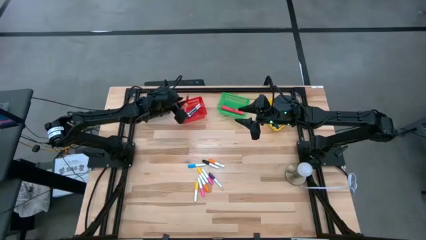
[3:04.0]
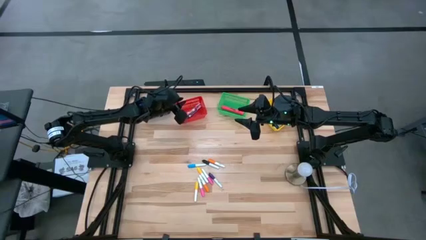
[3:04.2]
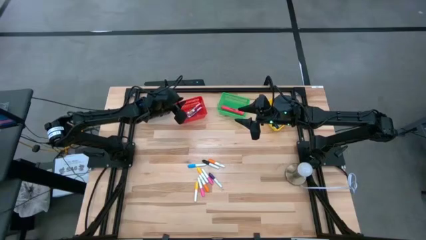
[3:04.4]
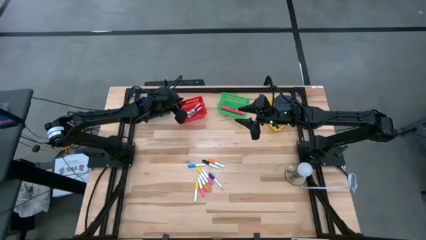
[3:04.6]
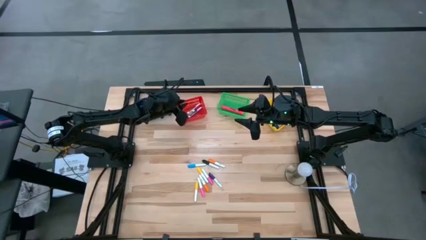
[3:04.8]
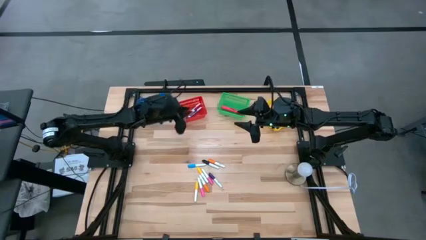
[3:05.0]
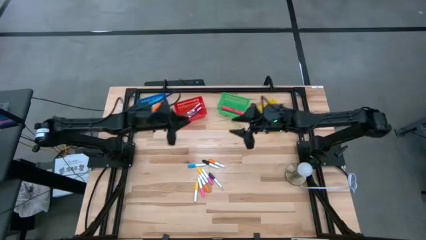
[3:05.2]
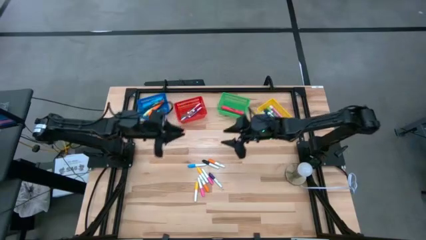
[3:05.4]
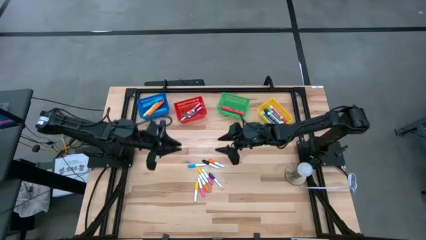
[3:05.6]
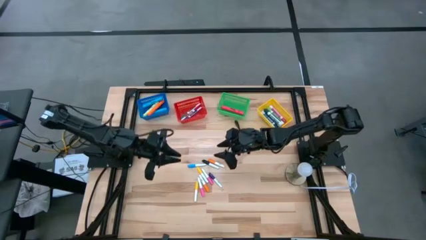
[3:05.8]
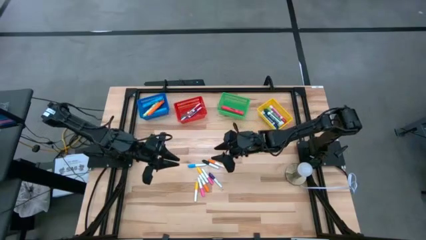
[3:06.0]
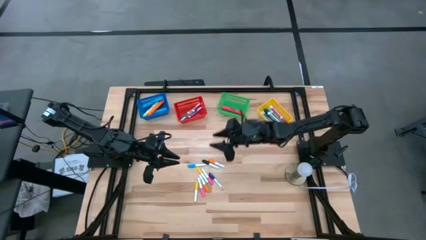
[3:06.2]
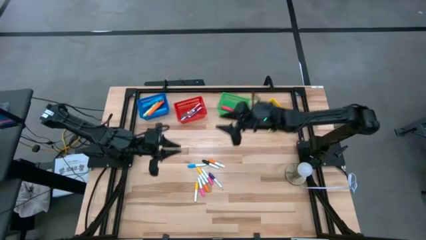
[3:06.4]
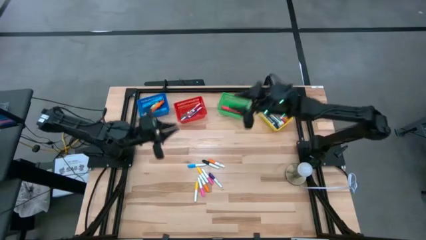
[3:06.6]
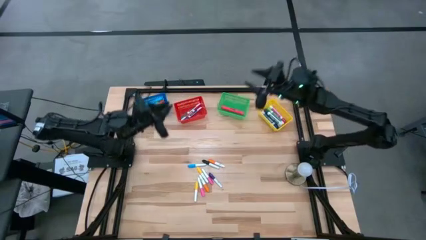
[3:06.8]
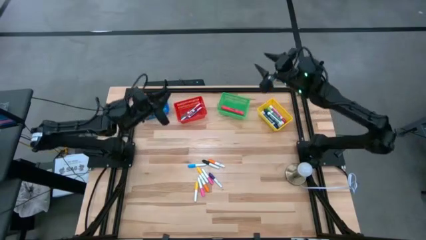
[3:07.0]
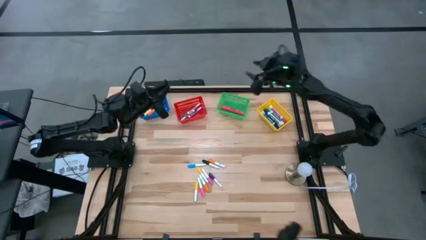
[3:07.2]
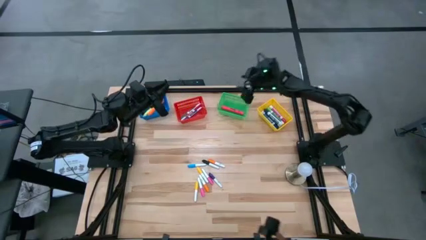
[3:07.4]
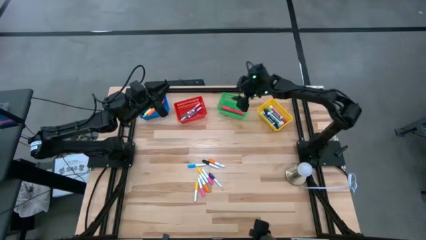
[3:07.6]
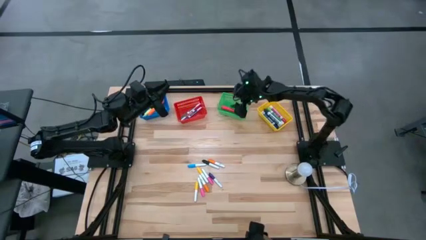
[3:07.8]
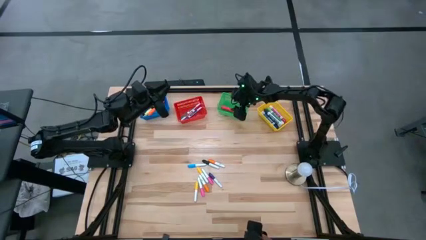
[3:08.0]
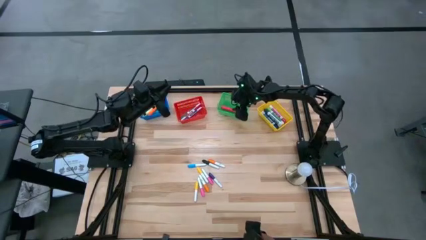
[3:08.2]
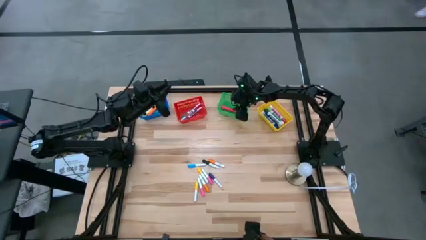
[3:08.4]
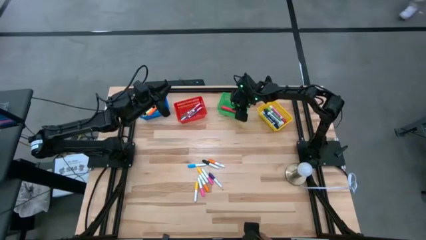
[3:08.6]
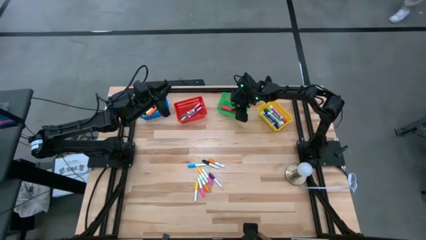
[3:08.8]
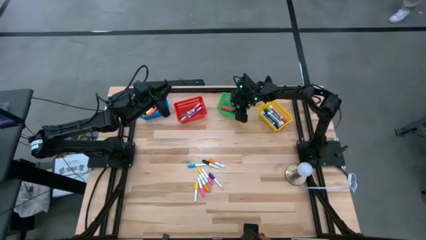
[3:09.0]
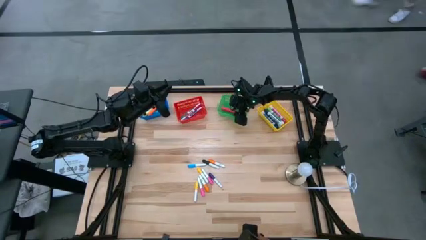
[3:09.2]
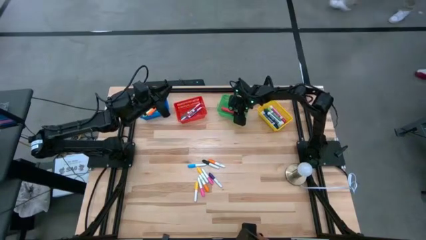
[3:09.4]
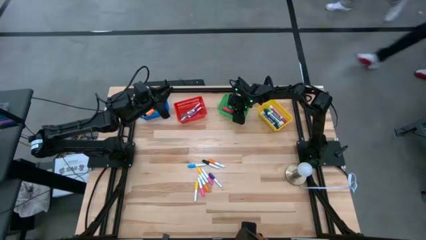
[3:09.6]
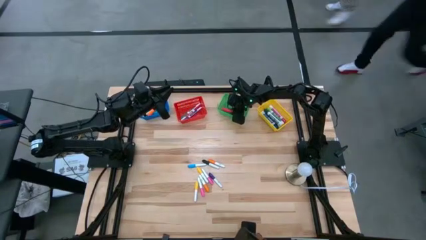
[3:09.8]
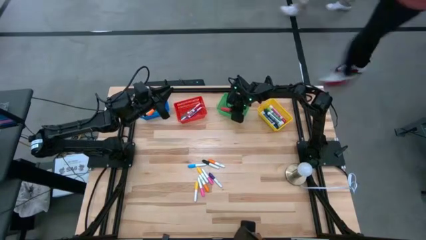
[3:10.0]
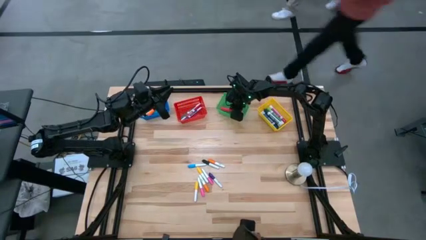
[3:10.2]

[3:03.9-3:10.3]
Task: Pick & Place Markers
Put the large pink highlighter pen into the blue bin

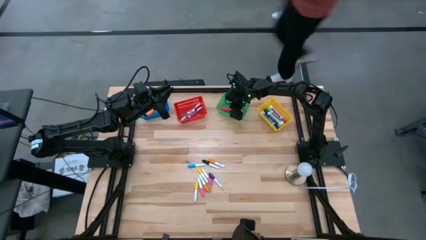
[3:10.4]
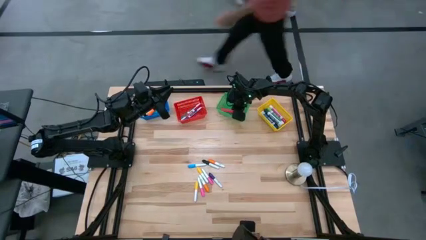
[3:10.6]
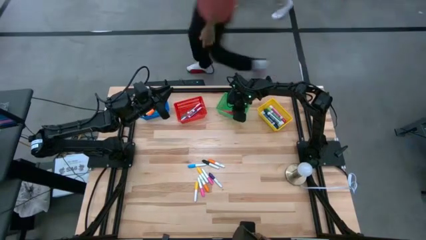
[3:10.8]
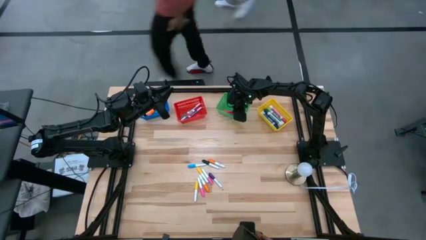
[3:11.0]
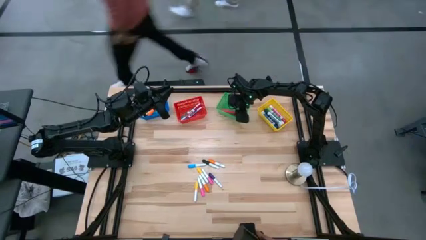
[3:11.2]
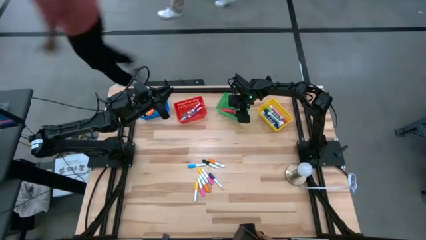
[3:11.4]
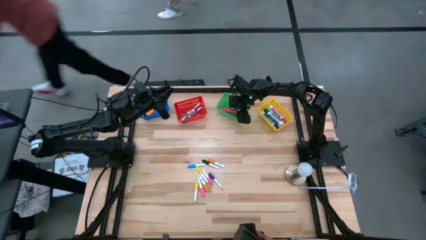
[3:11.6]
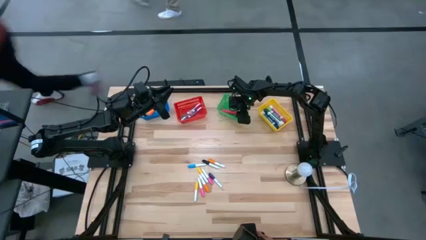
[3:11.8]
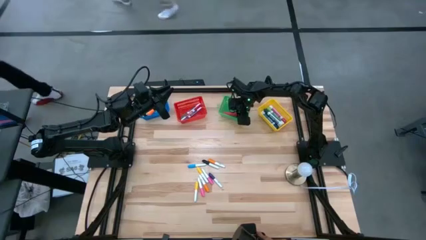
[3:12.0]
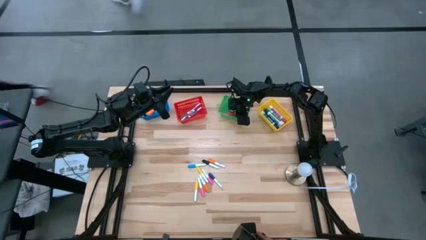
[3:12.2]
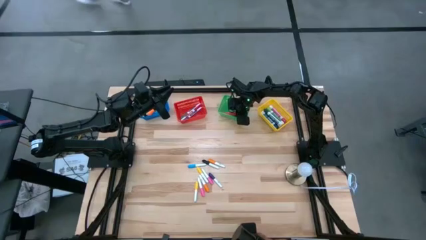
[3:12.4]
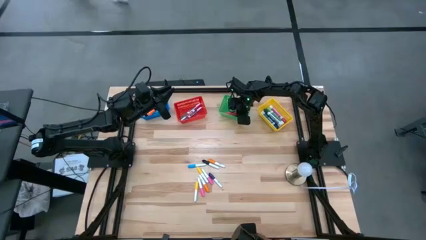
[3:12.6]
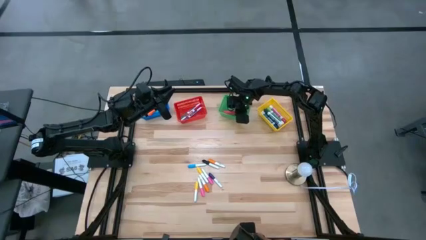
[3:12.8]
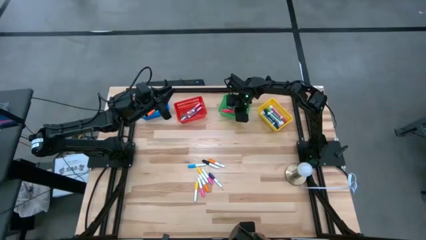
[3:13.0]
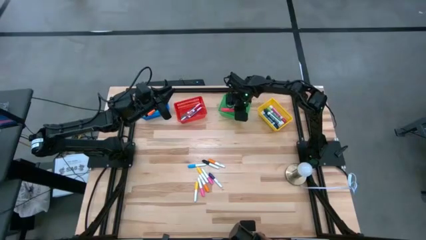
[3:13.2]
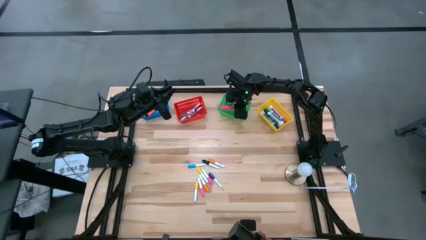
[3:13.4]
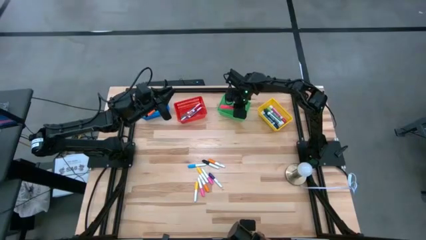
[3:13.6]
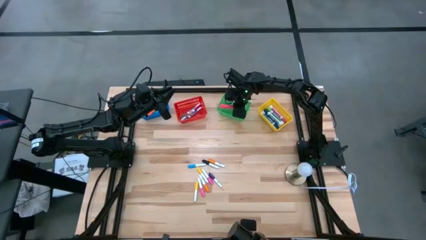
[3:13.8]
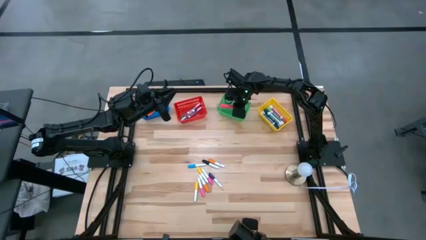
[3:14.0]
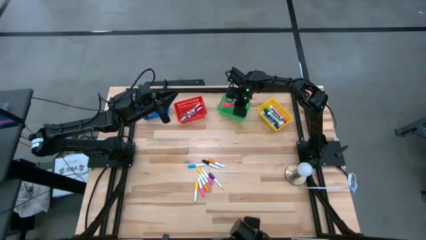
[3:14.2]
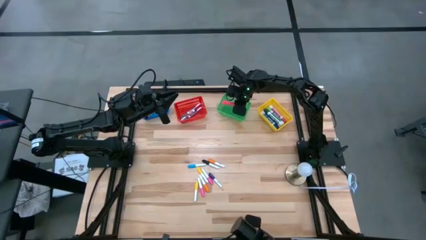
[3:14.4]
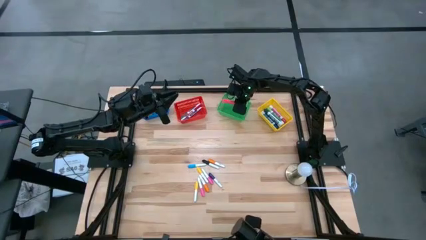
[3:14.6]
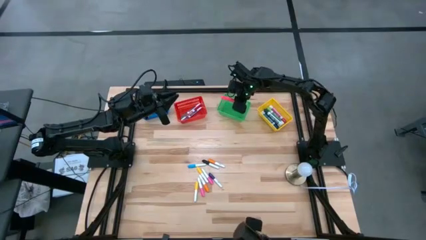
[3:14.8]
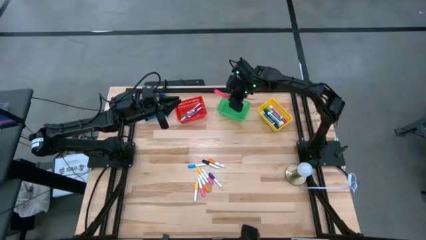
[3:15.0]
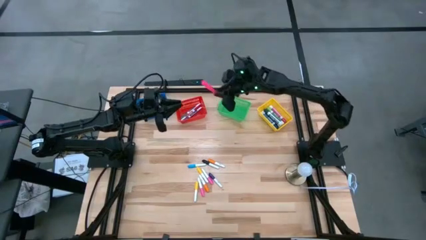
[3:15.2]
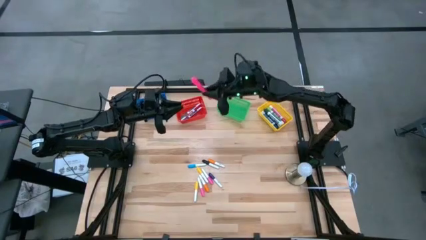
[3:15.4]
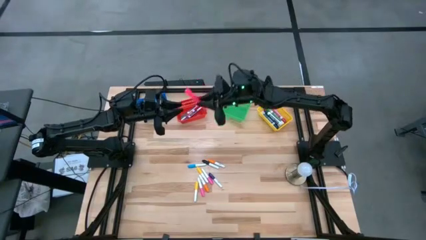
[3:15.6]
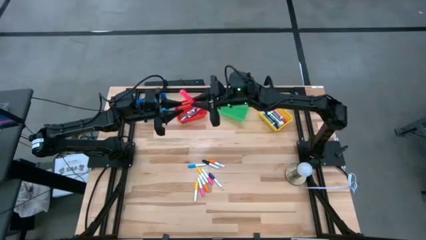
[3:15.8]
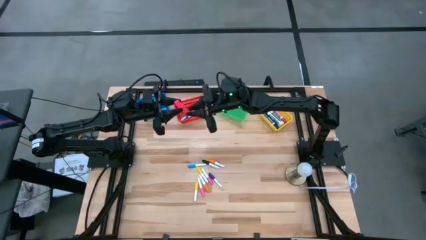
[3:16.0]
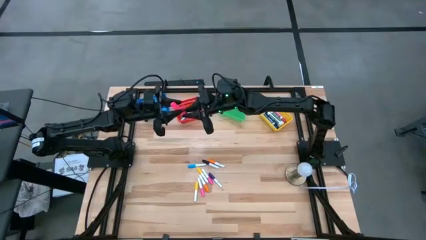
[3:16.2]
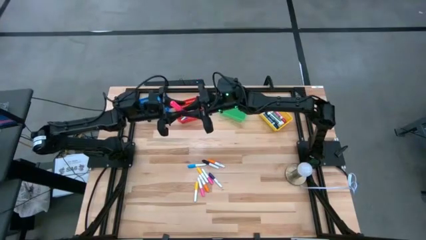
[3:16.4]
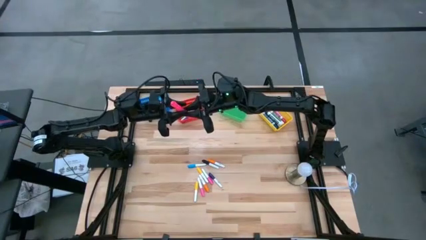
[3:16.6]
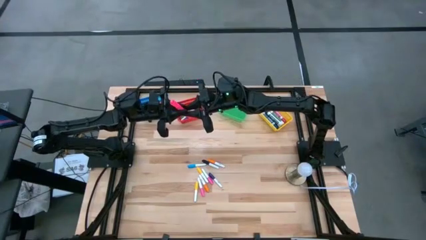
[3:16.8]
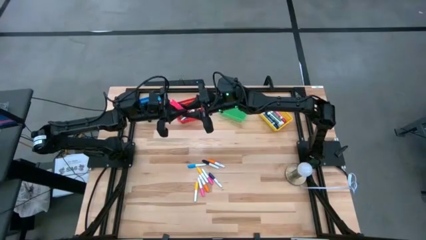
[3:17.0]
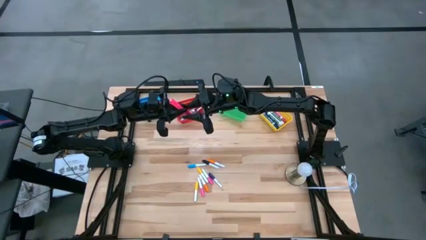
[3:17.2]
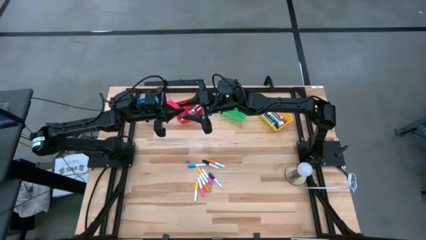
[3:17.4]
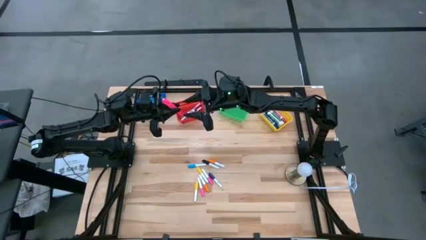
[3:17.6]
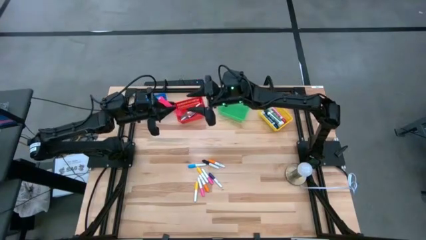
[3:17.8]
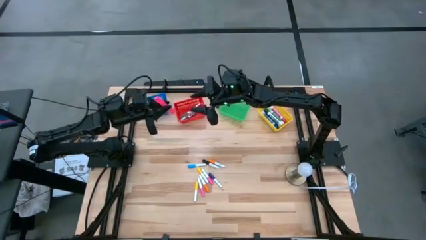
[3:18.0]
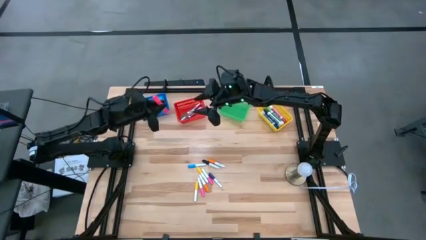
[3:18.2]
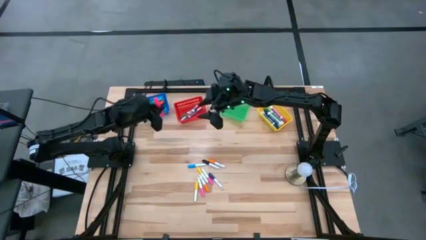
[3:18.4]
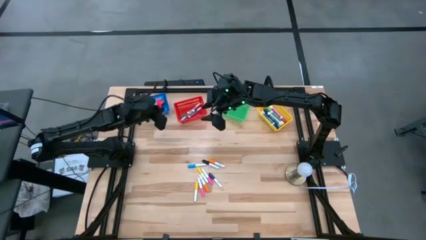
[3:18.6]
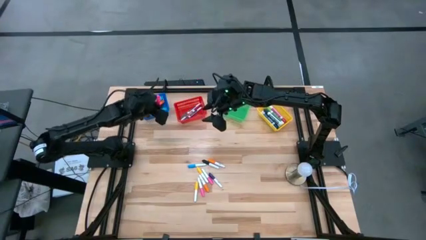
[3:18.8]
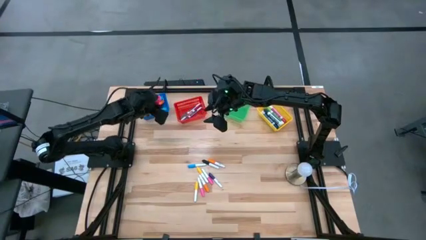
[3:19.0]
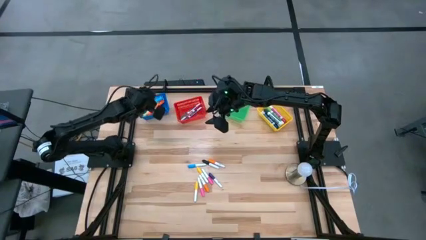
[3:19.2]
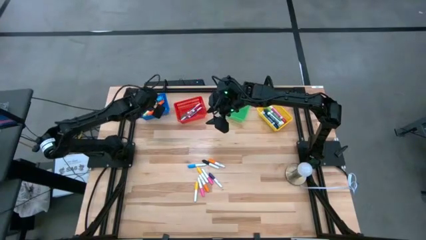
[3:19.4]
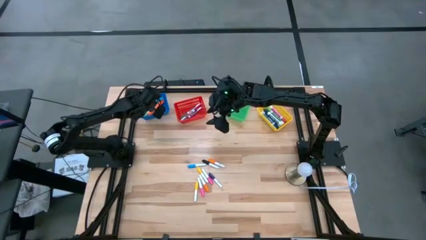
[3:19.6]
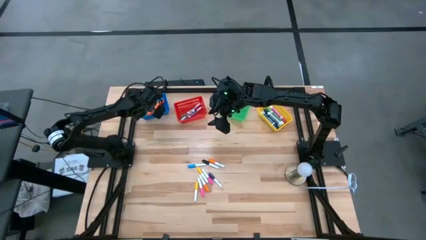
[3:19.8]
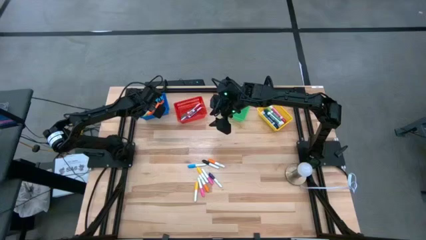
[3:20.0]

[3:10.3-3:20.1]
Put the large pink highlighter pen into the blue bin

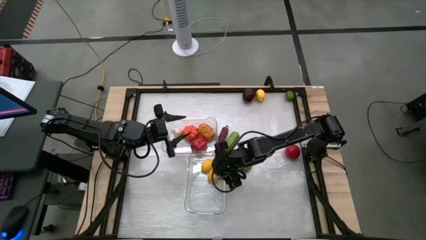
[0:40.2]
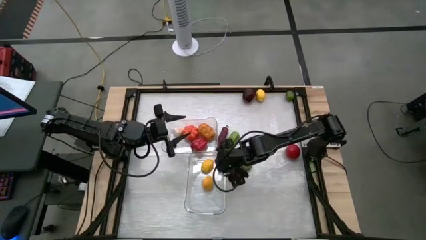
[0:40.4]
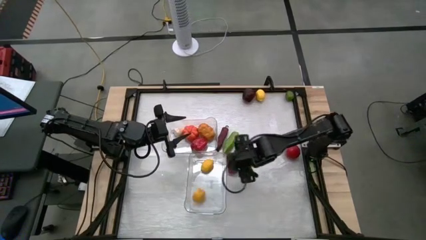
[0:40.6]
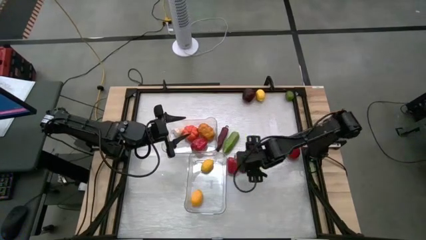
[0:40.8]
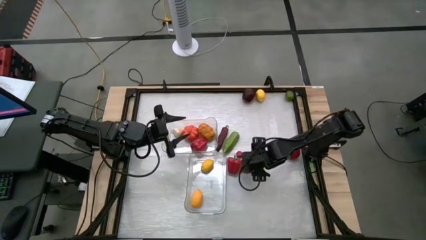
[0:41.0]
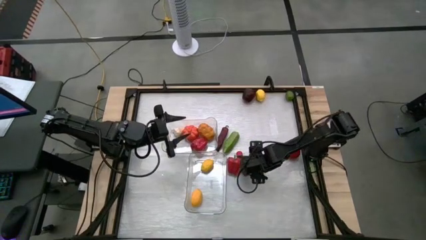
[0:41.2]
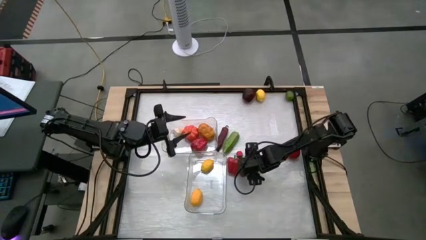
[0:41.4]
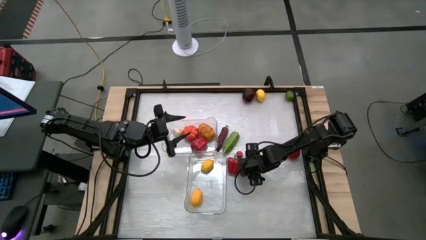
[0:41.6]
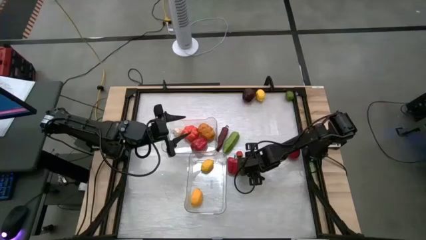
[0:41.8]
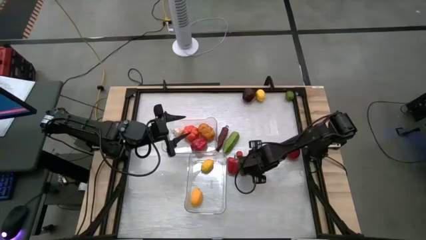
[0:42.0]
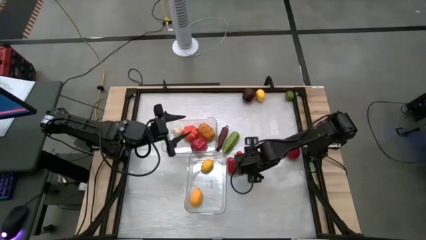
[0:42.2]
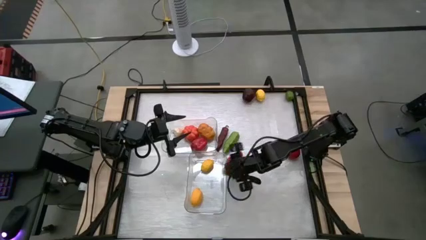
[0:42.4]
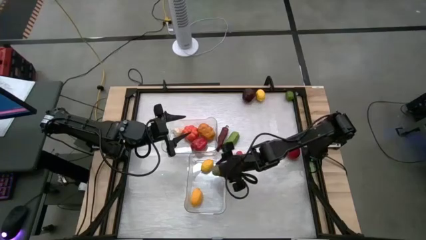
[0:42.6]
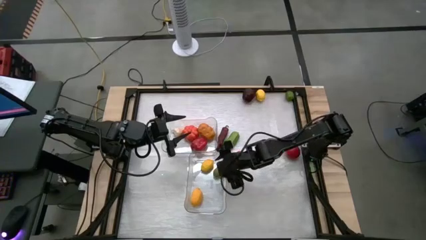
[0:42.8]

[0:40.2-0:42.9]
Task: Sort produce into baskets
Put the bottom lime into the bottom transparent bin
